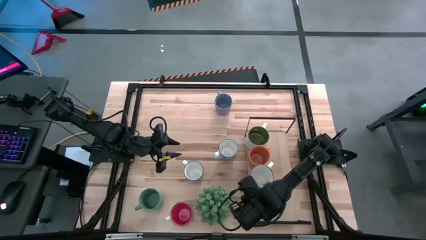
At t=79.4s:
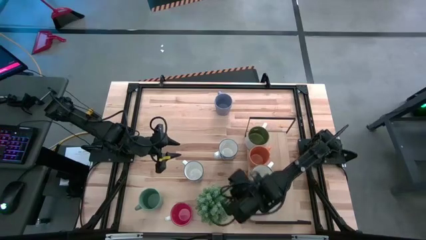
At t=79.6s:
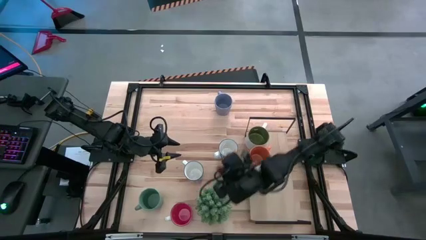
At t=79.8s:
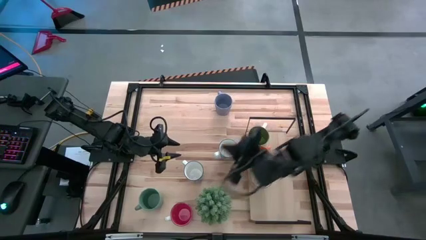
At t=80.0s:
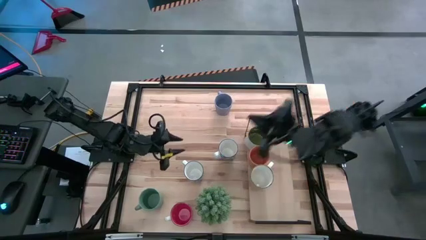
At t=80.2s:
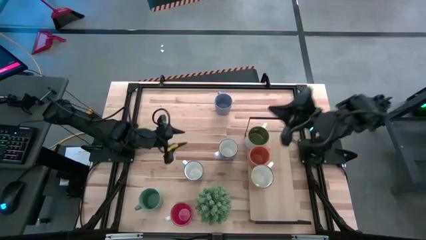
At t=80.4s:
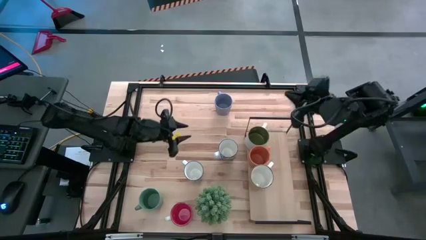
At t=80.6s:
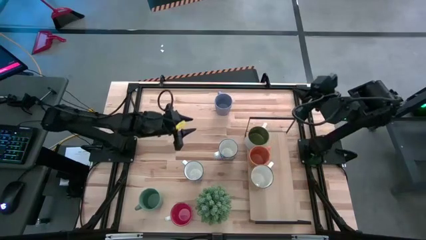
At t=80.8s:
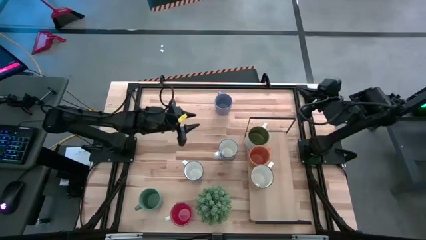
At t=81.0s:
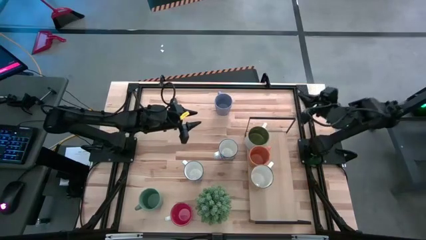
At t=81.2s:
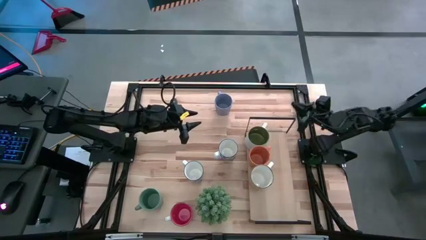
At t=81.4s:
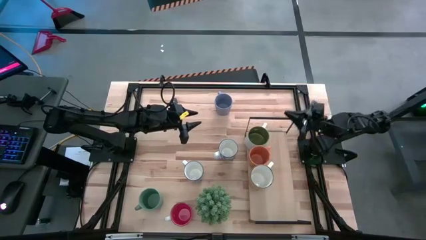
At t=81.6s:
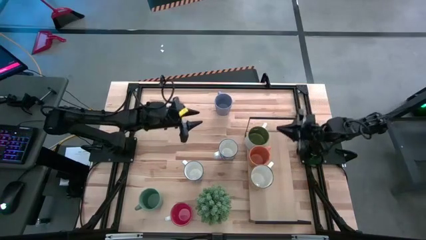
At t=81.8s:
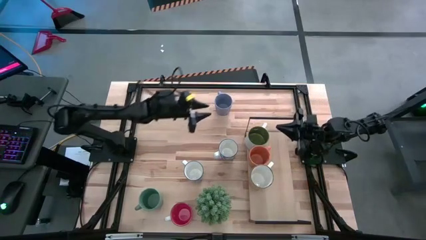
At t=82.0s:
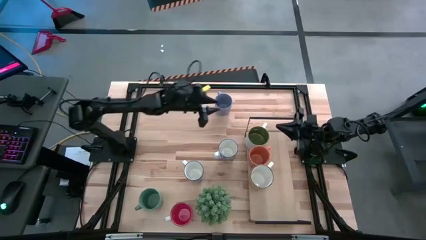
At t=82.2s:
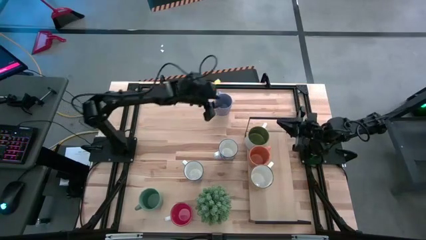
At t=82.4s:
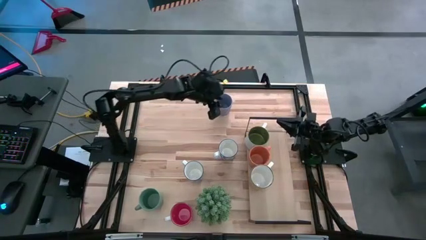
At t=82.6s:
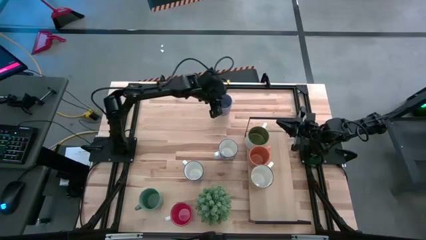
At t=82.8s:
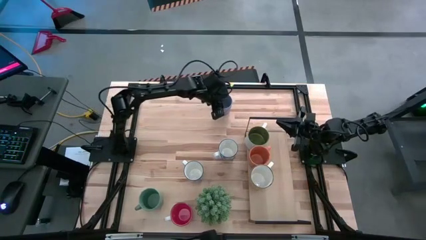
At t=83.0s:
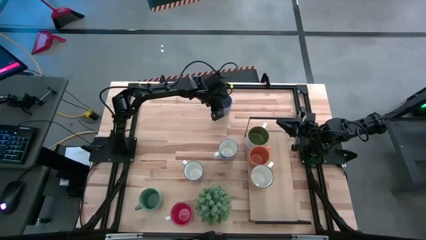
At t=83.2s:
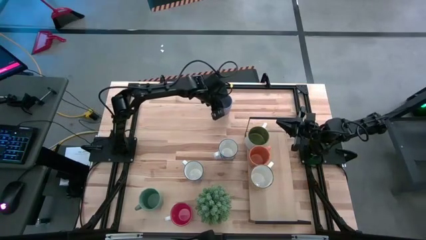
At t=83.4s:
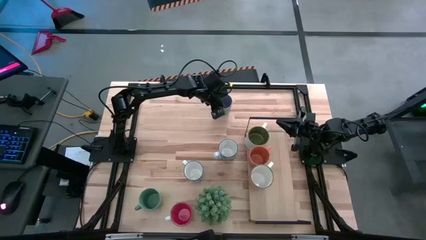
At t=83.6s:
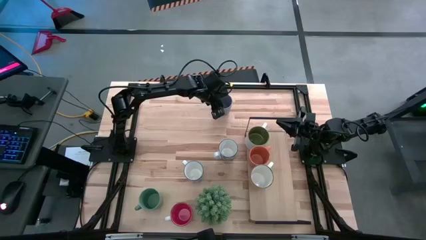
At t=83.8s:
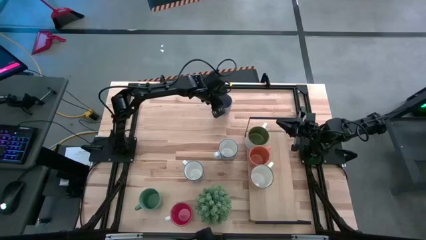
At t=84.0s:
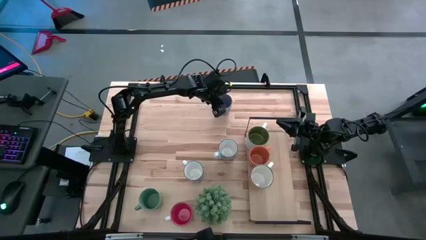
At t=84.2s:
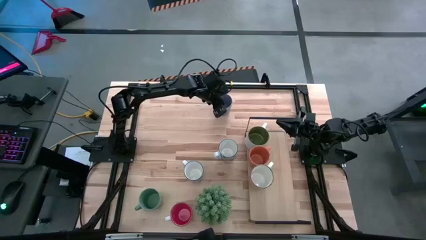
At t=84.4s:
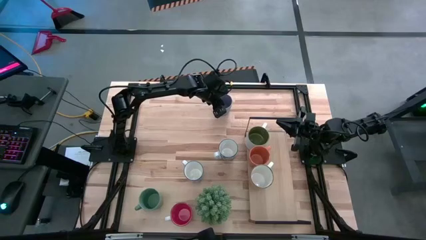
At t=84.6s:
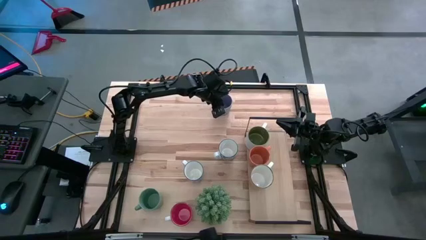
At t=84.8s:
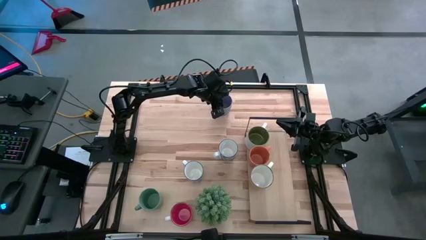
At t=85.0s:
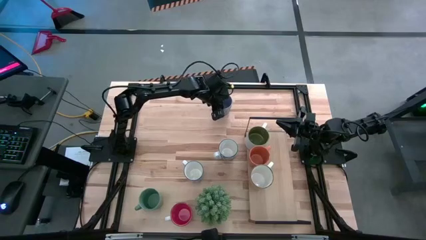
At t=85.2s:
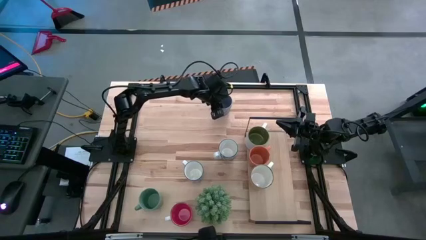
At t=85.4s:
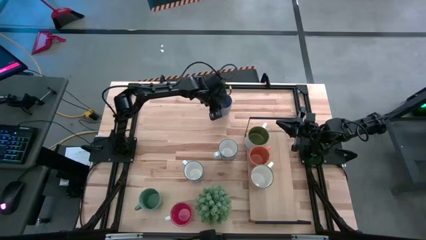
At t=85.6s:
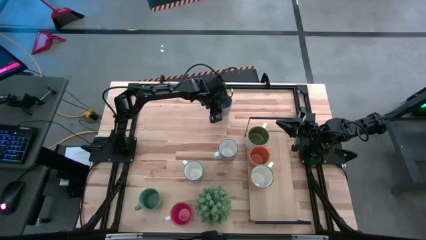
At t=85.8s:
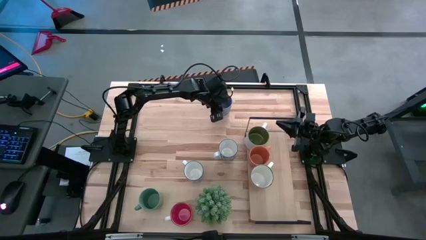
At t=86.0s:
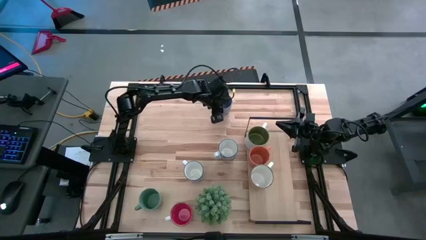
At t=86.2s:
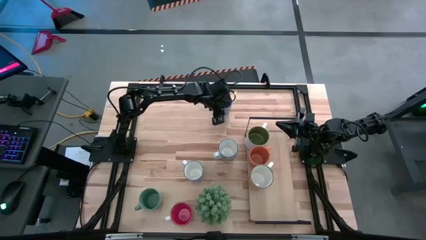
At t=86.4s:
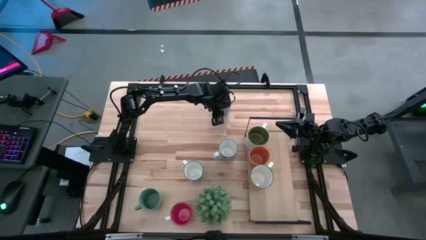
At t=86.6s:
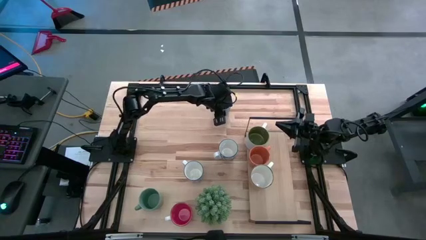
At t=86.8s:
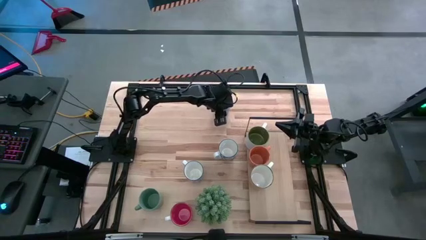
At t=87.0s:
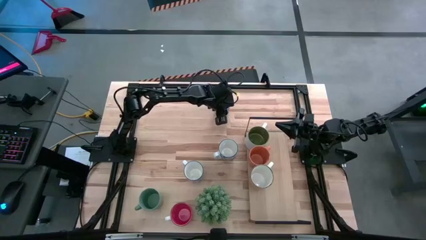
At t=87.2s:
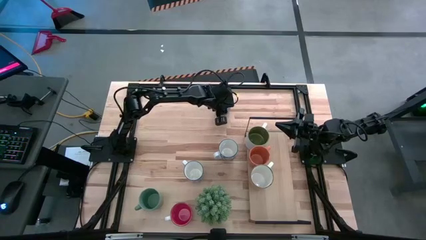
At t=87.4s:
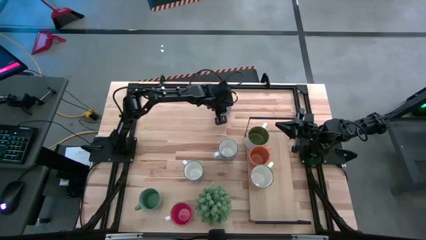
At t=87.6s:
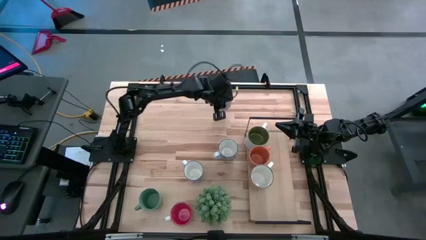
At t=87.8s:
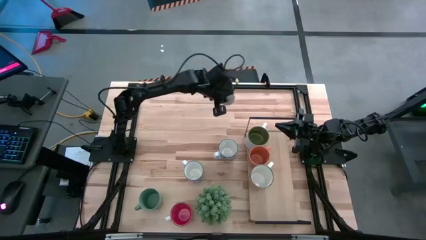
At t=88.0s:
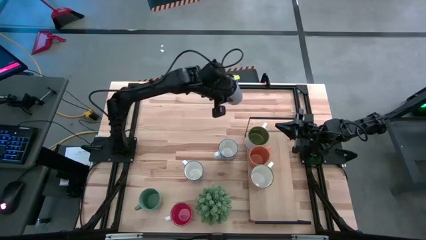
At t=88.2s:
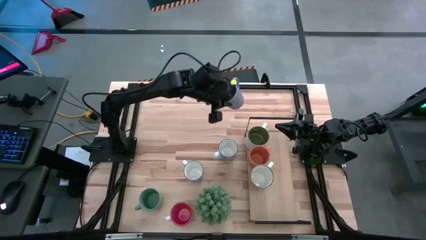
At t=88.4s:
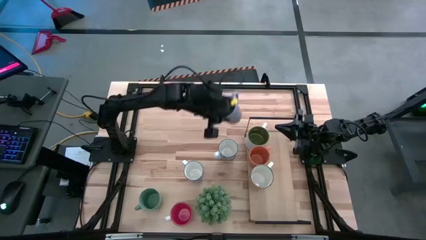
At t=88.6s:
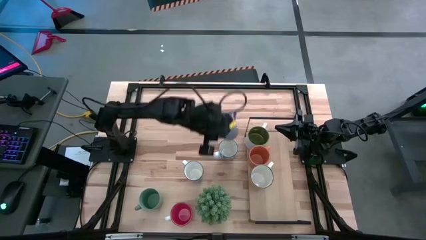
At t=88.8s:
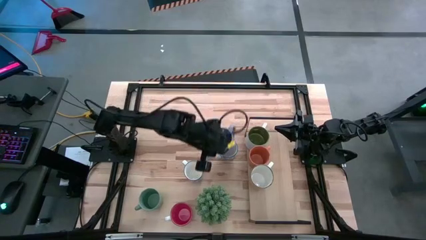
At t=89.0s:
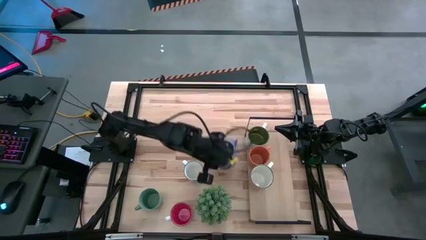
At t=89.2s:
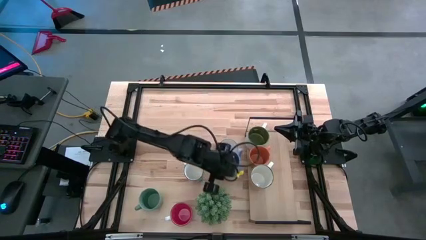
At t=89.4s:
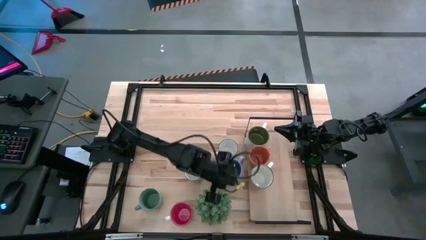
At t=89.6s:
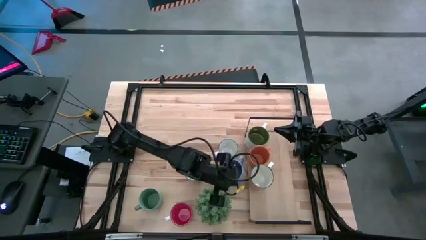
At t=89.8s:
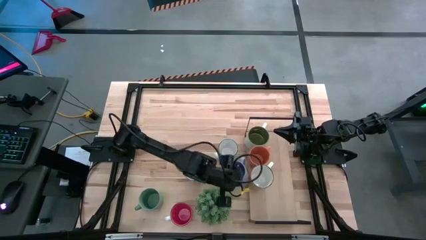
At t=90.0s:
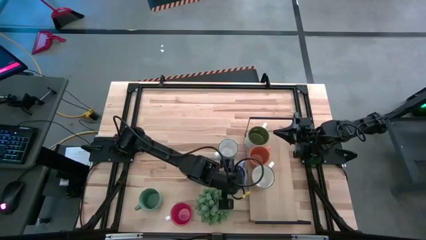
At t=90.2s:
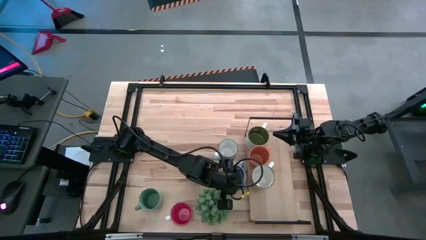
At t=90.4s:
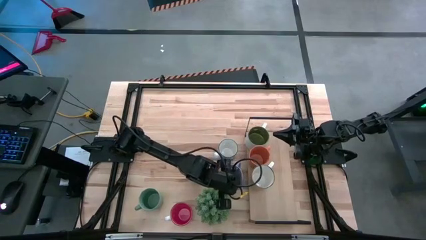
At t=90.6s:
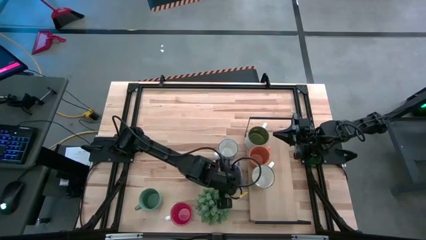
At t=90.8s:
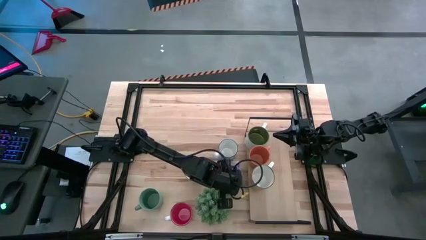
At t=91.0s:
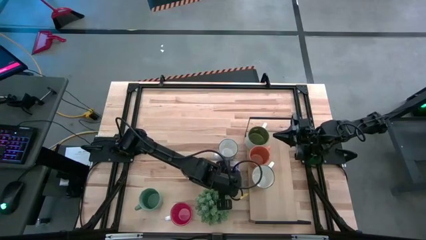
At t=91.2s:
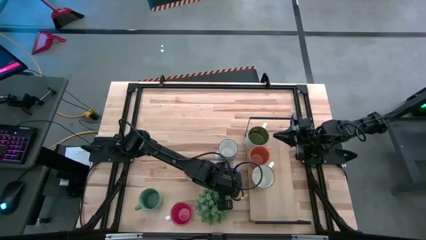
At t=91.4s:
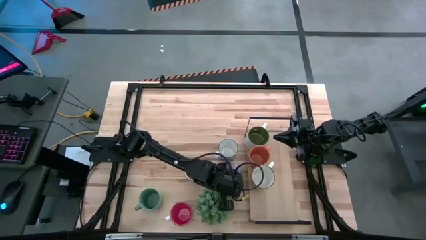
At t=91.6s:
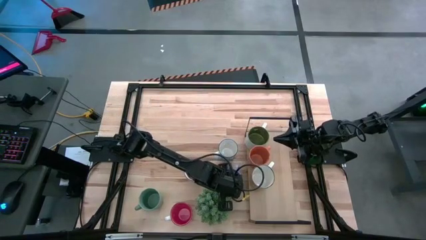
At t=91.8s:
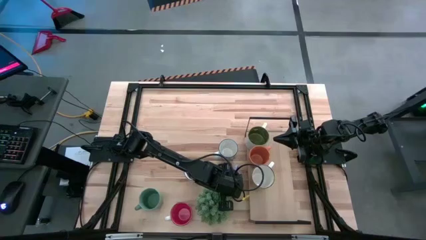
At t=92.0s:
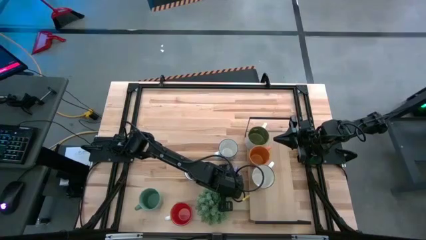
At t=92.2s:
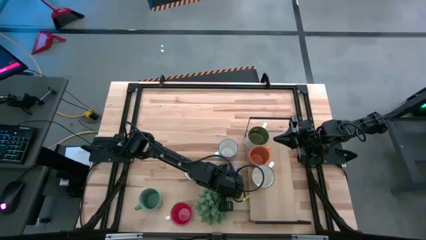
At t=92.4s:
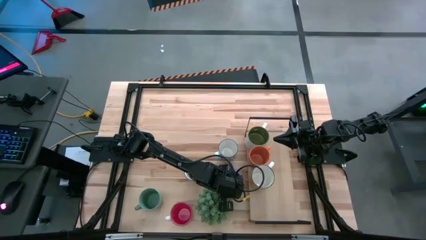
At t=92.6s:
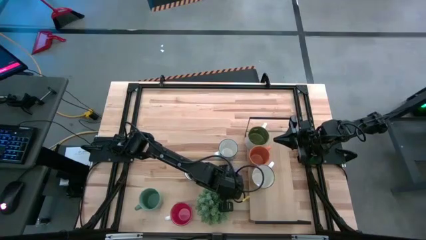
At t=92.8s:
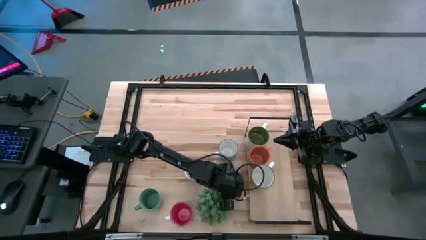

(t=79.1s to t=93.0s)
Task: Place coffee mugs
Move the light blue mug to the center of the table

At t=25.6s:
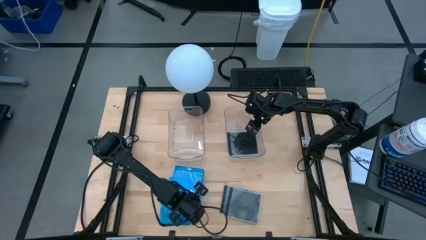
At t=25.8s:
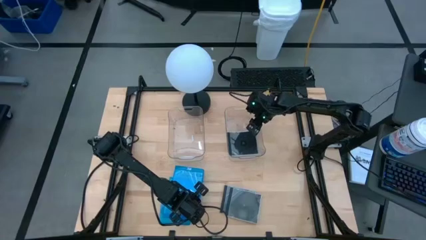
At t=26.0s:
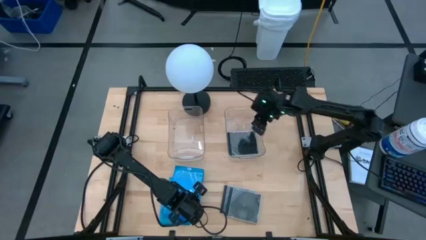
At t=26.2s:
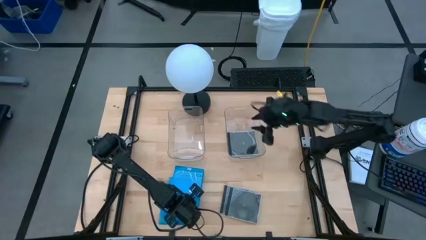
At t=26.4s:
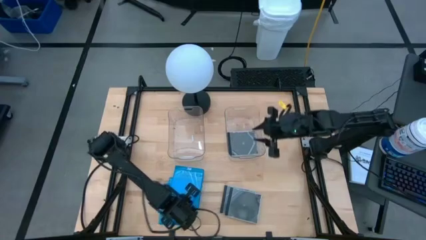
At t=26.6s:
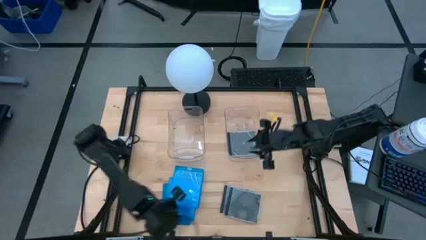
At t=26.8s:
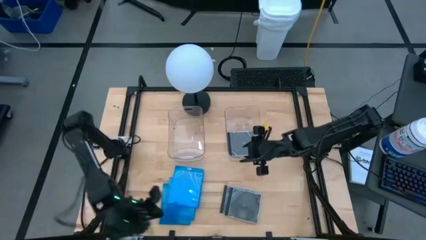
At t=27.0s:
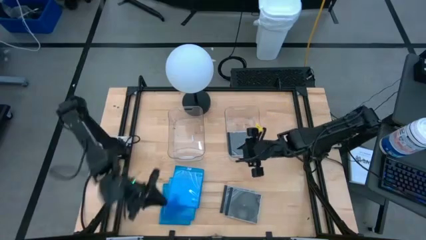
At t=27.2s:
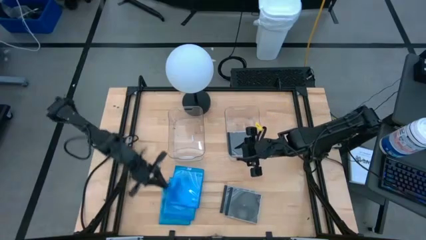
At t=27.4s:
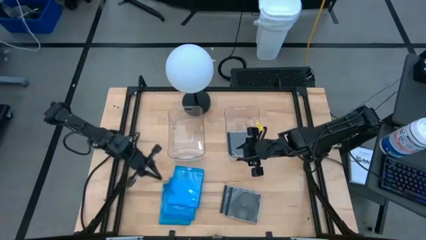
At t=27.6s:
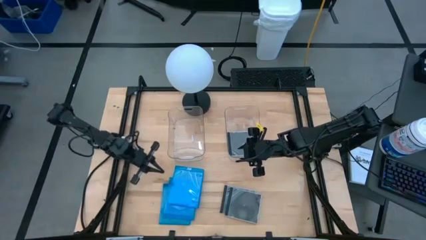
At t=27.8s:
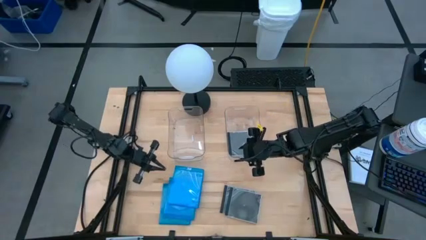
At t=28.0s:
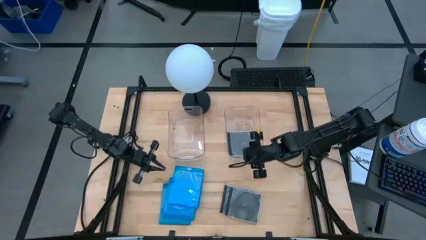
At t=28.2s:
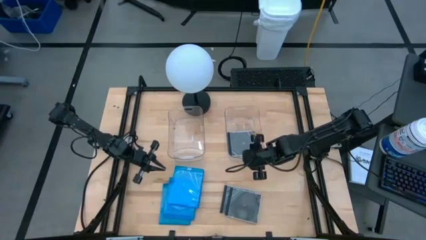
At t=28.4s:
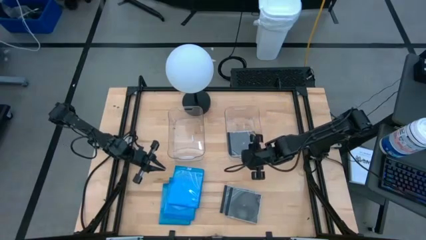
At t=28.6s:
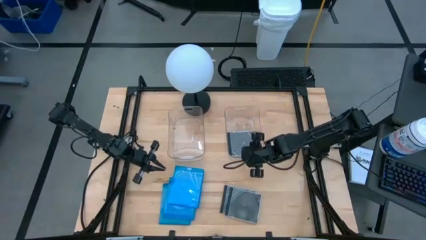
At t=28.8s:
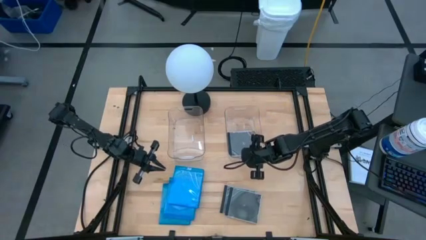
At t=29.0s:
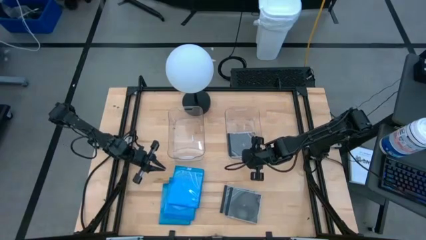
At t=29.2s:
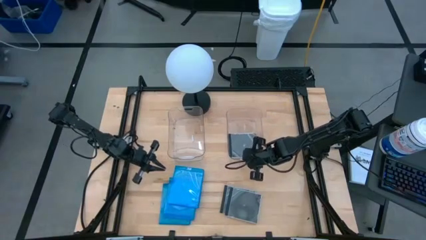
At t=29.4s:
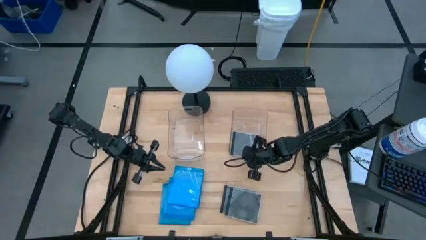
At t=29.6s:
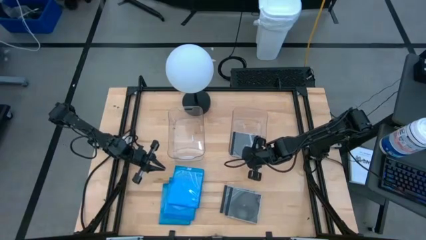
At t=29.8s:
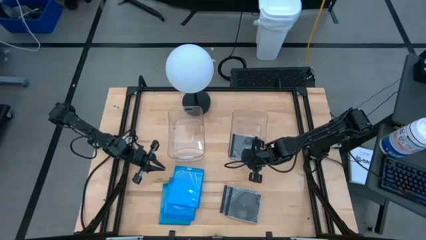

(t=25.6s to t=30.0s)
Task: Pick & place jewel cases by type
Adjust the right transparent bin
